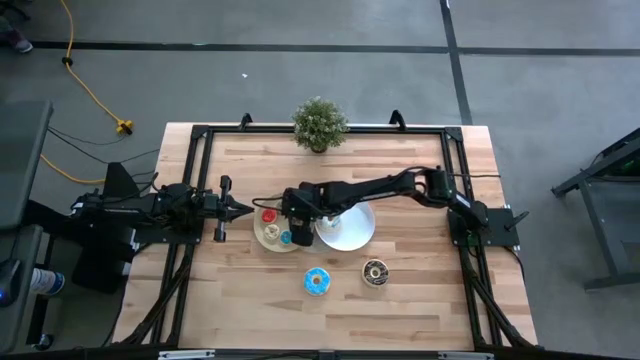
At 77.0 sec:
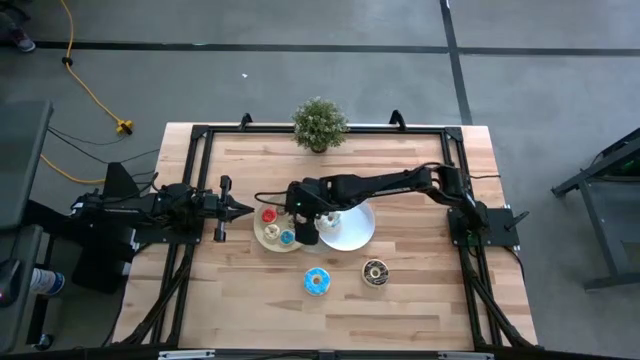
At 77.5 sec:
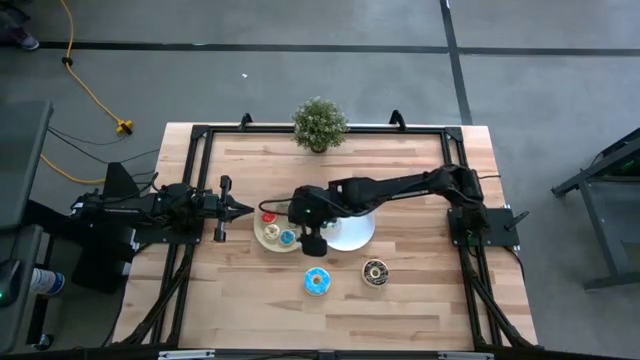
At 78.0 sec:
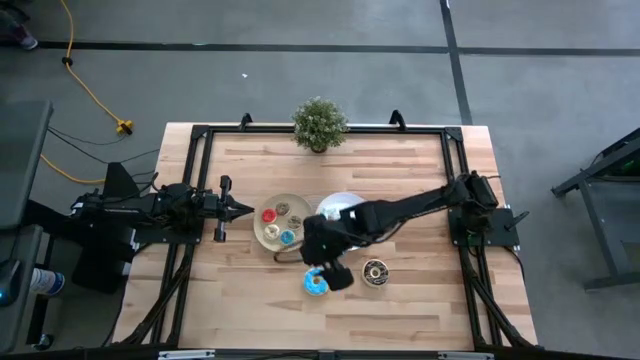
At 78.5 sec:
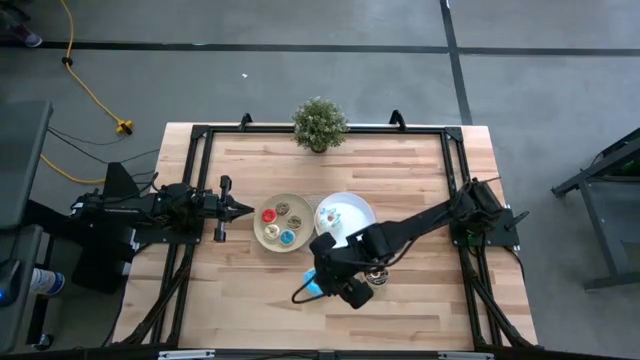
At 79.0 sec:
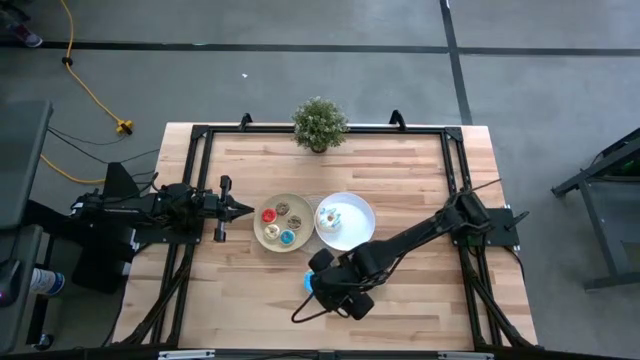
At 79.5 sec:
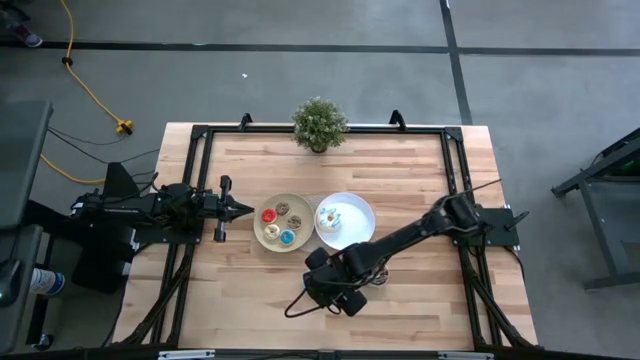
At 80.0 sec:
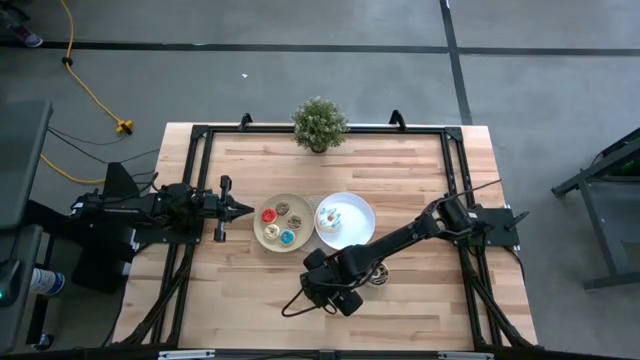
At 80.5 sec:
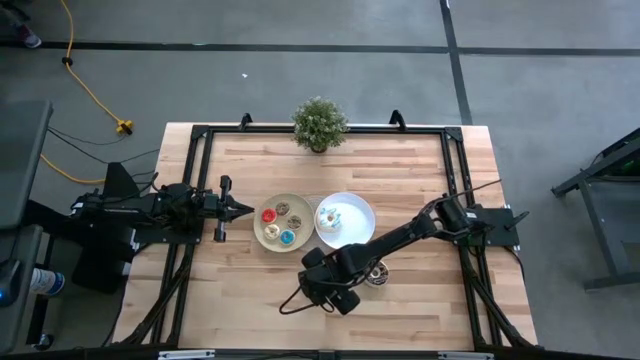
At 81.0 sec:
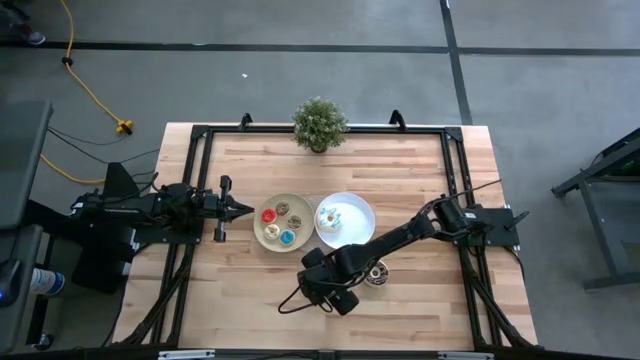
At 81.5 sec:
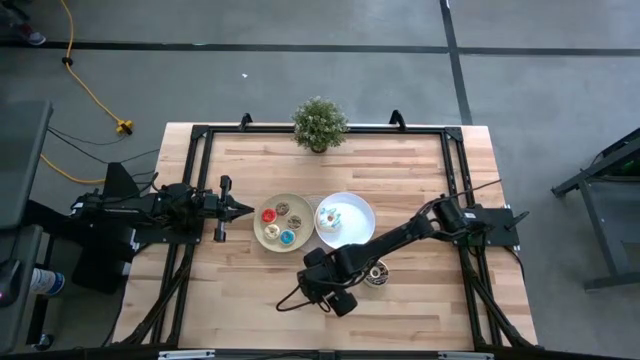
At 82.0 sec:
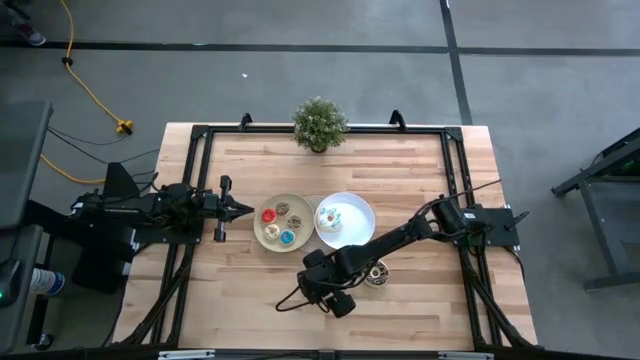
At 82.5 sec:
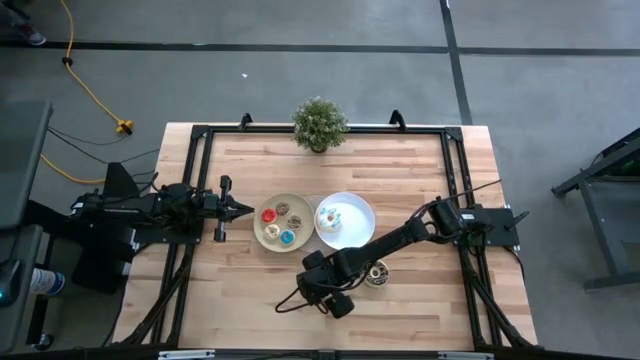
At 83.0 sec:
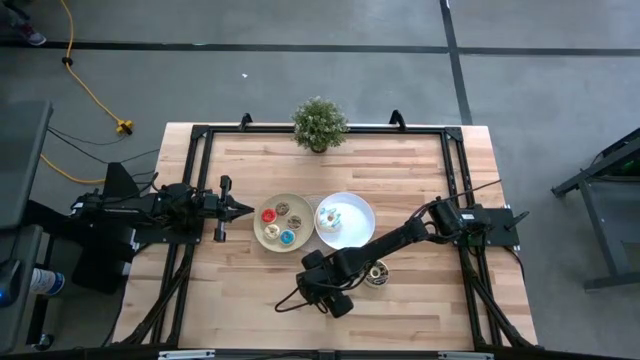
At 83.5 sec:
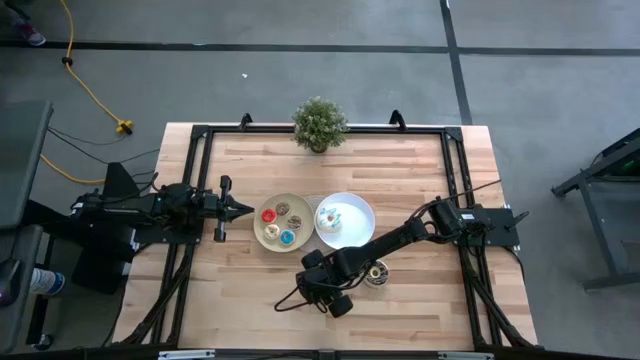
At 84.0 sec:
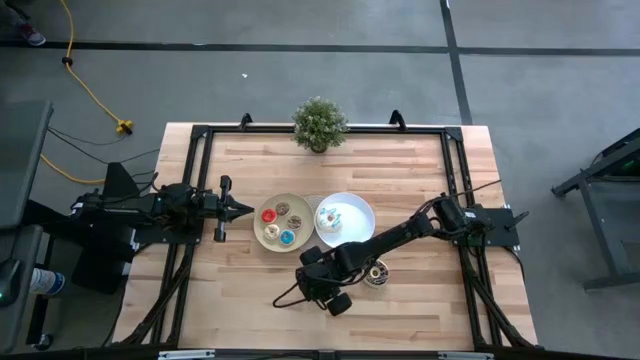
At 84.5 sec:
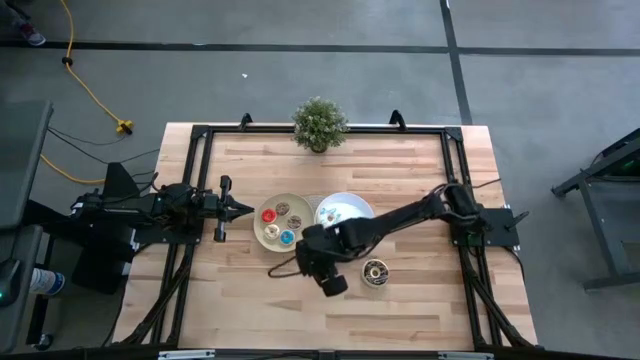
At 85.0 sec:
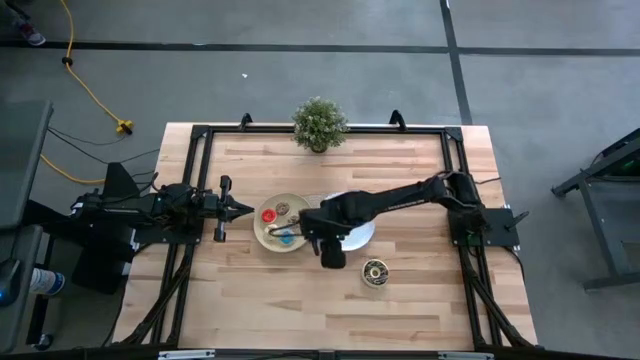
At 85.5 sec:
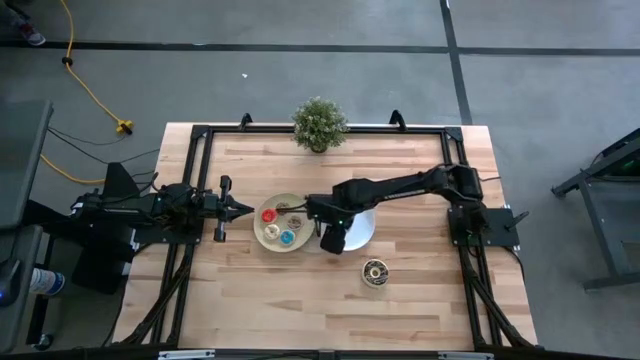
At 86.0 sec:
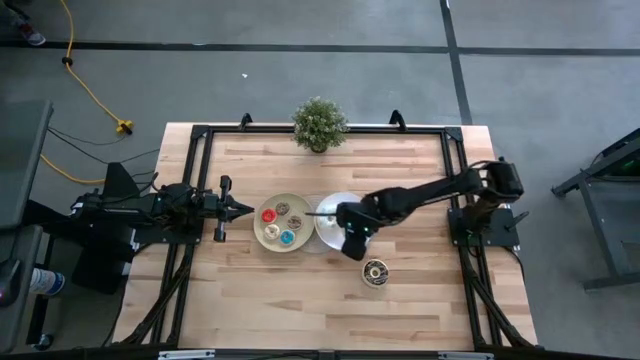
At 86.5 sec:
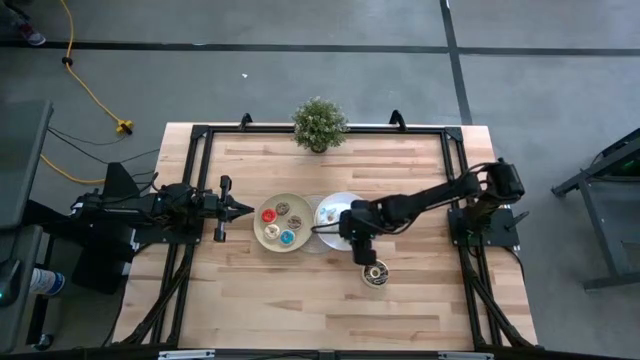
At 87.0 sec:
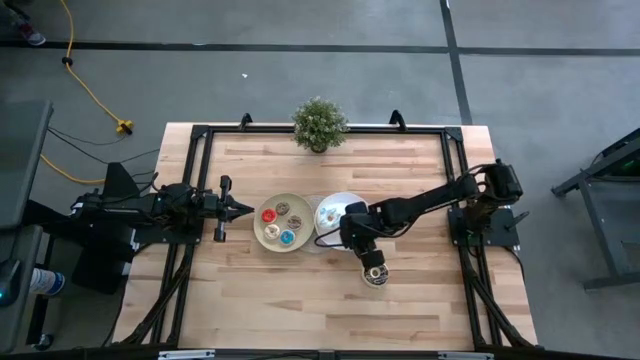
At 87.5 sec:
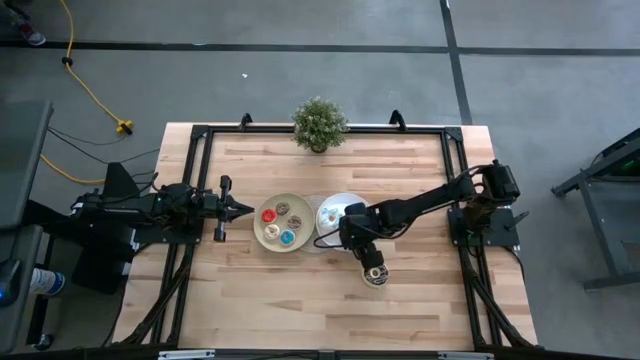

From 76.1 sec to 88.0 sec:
Task: Pick & Place donuts
Put the large blue donut on the white plate

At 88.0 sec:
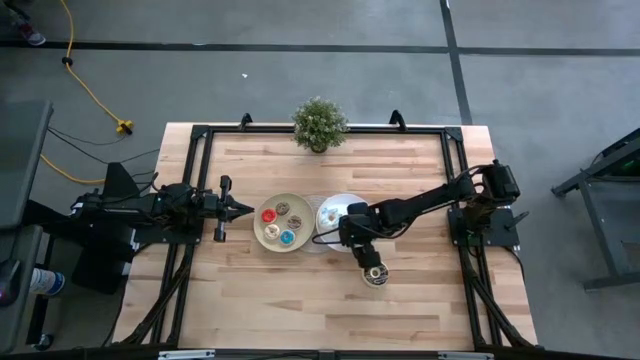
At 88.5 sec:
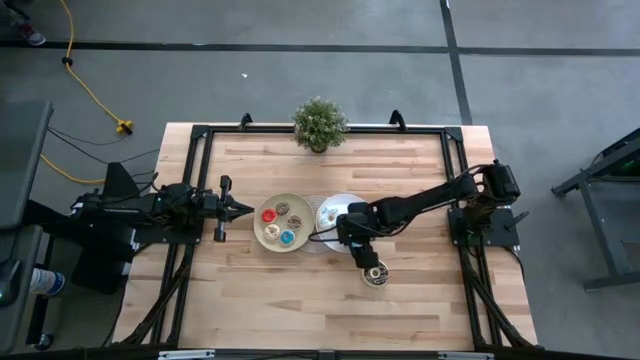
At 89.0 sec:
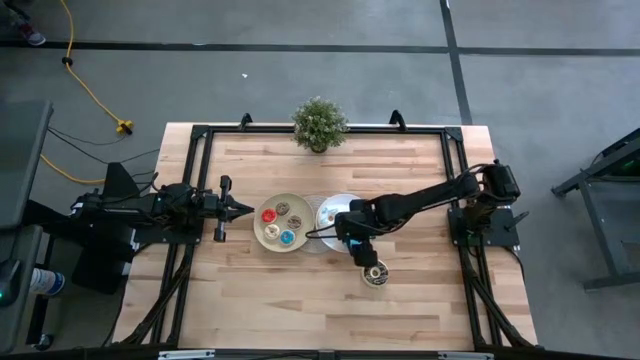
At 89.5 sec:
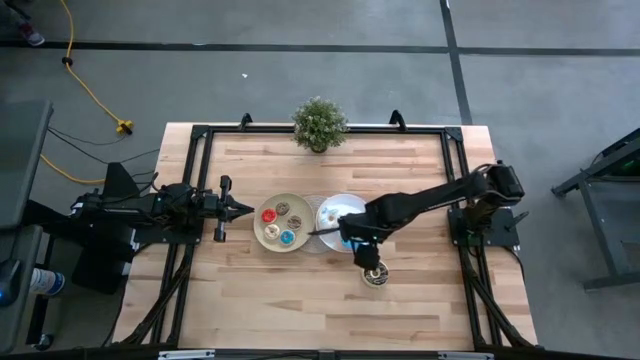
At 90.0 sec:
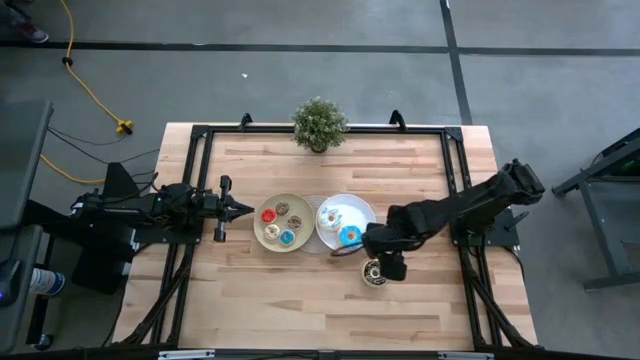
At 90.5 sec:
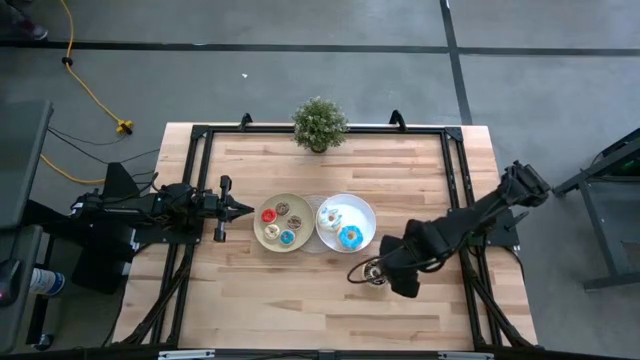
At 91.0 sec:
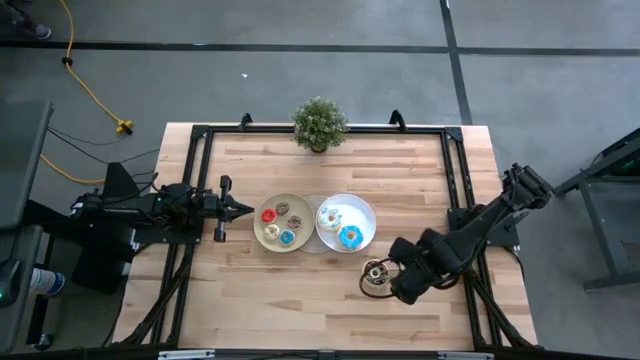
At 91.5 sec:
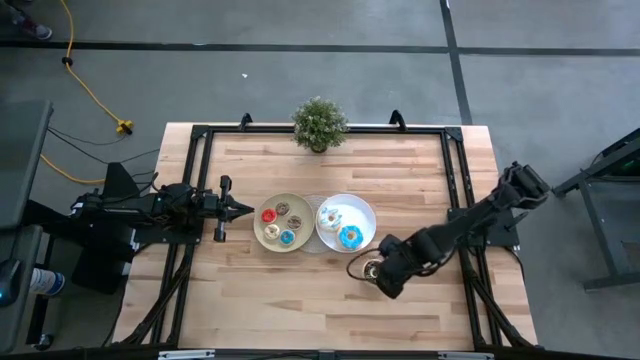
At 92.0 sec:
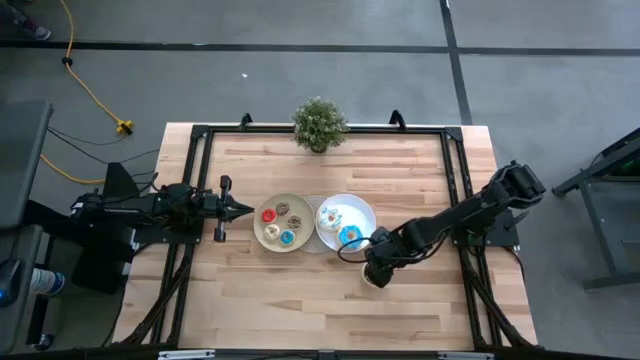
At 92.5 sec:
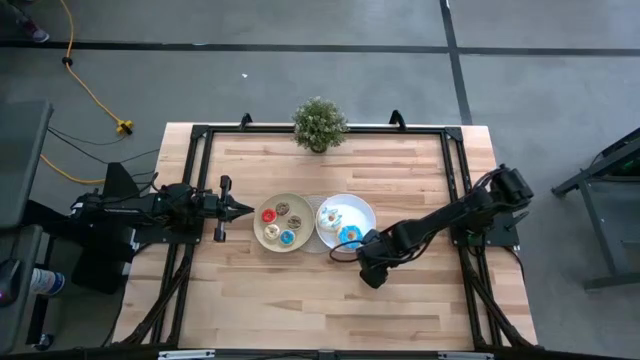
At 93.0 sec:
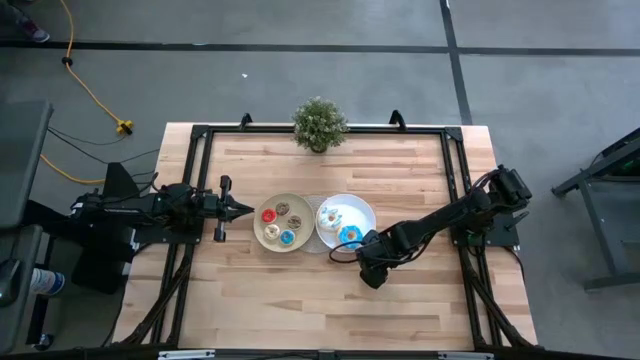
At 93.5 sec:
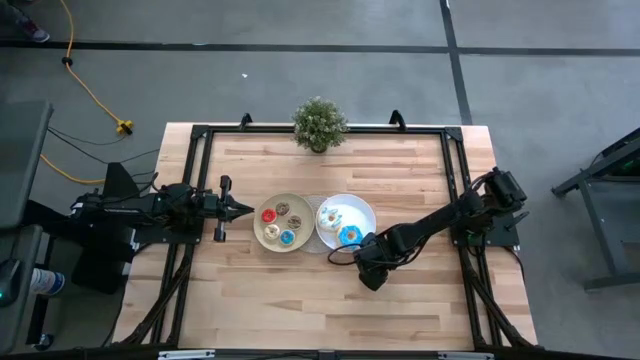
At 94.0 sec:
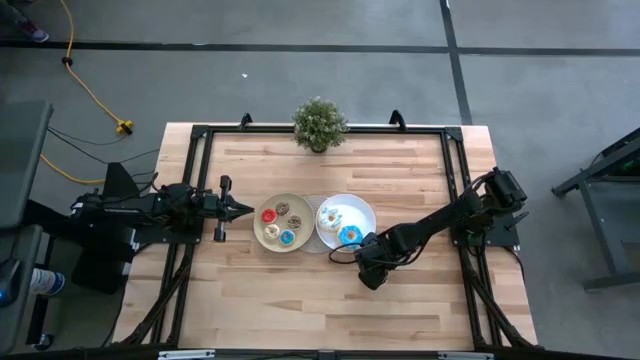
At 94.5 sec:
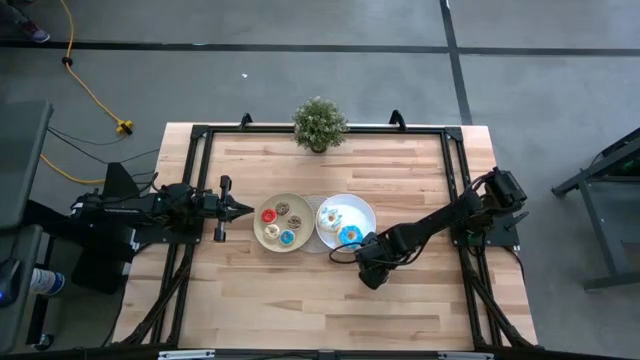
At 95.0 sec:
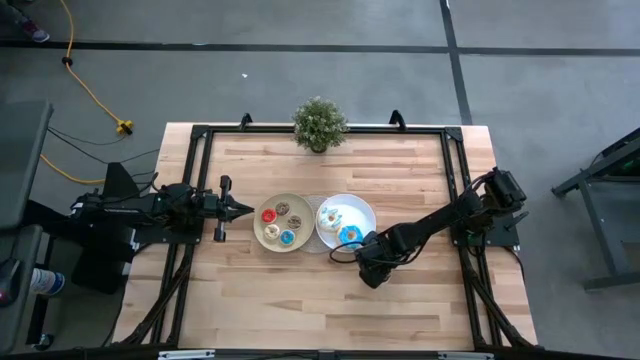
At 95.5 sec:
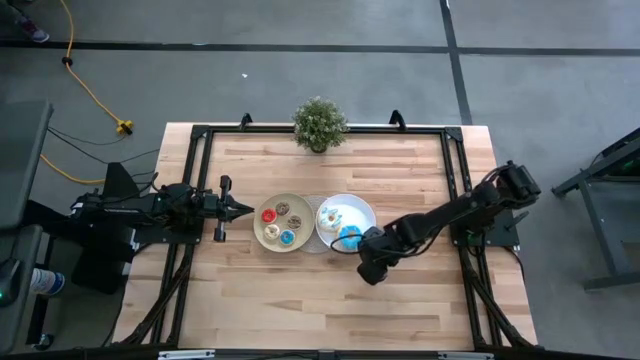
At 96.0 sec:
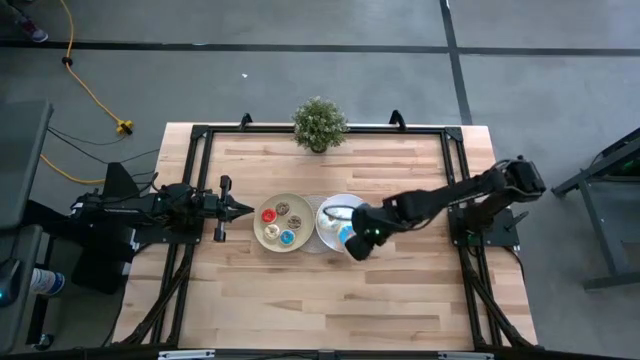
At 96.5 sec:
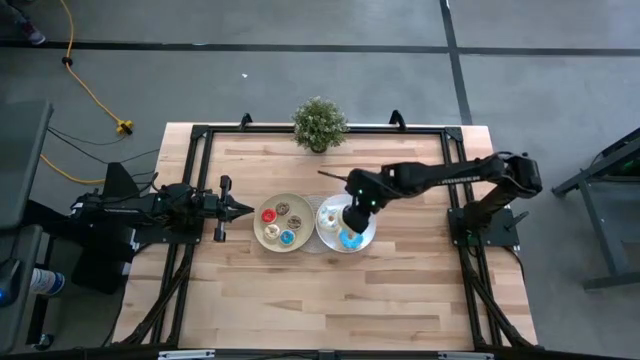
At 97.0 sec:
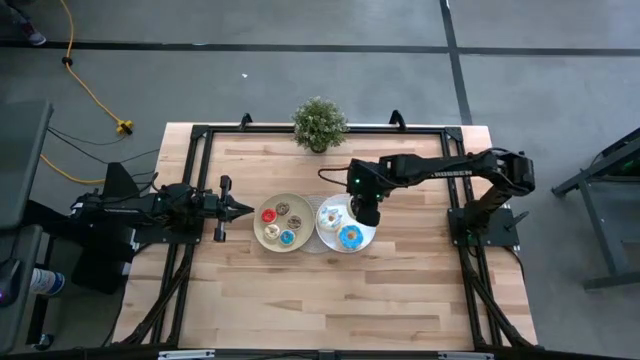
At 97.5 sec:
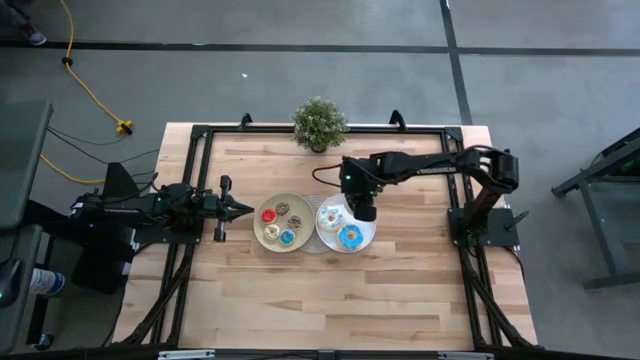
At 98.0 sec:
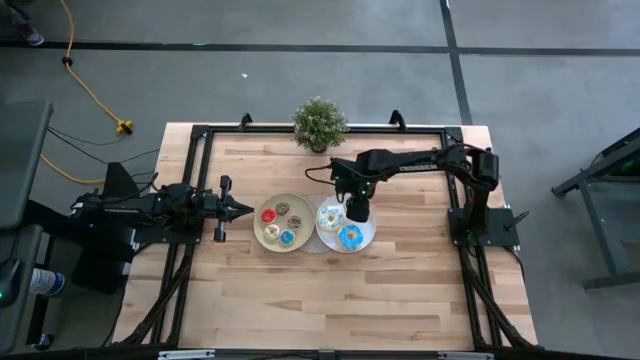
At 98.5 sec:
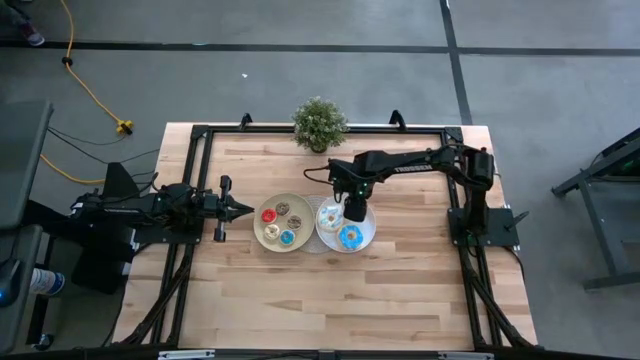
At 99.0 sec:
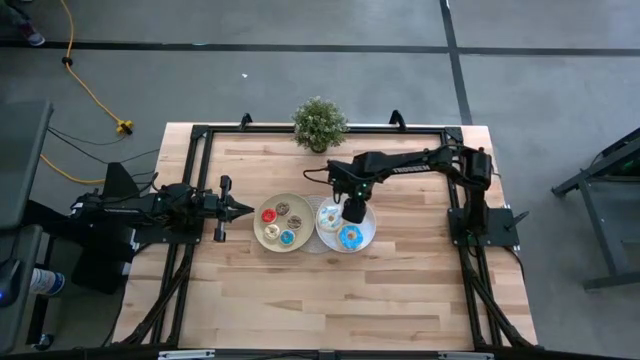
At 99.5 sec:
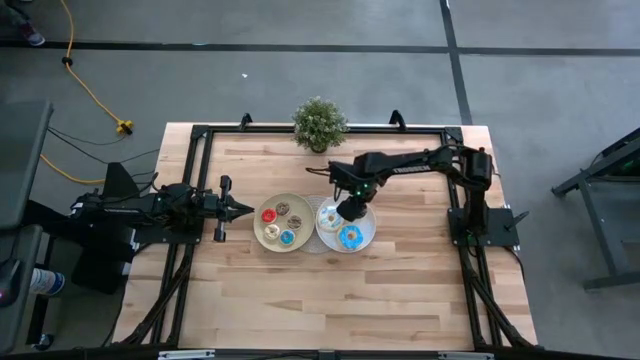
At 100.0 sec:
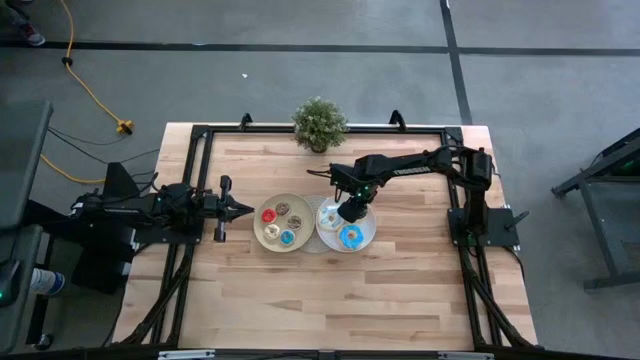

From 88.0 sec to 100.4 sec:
Put the large black donut on the white plate
